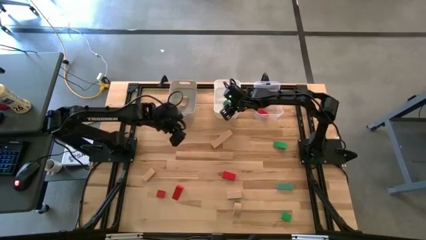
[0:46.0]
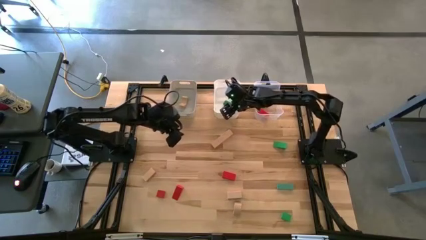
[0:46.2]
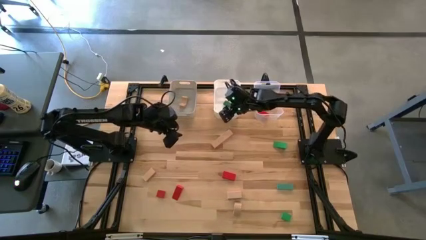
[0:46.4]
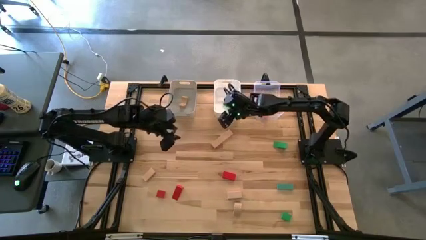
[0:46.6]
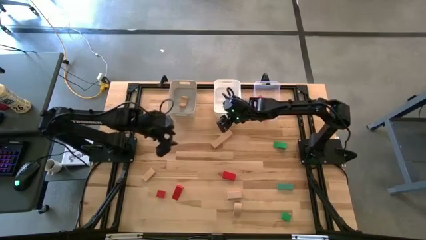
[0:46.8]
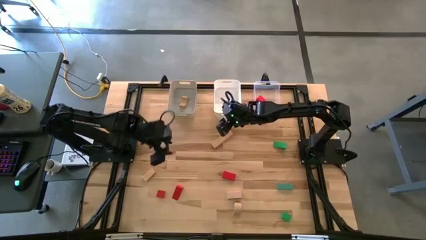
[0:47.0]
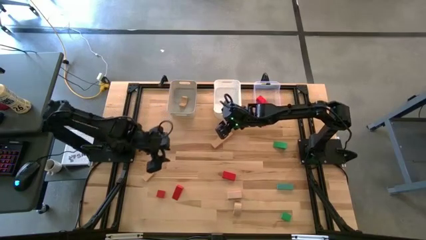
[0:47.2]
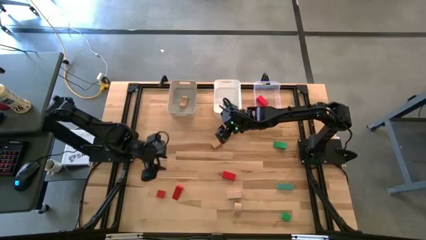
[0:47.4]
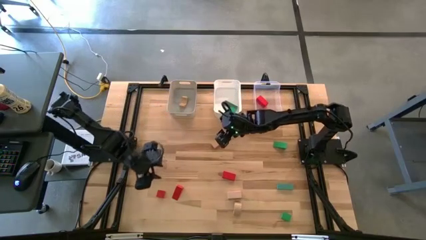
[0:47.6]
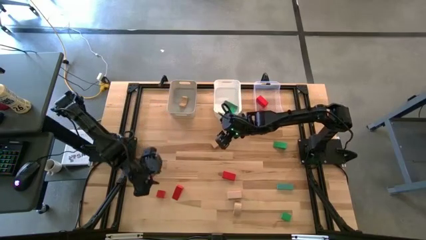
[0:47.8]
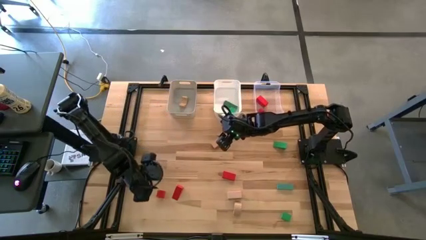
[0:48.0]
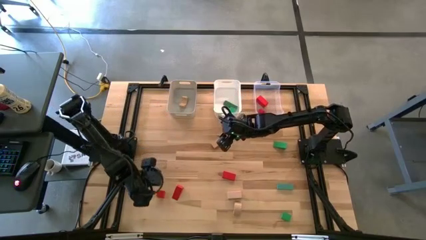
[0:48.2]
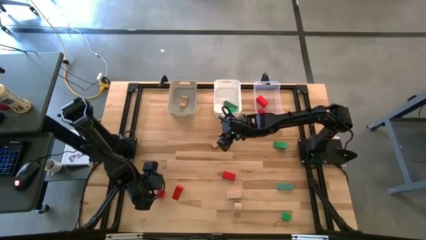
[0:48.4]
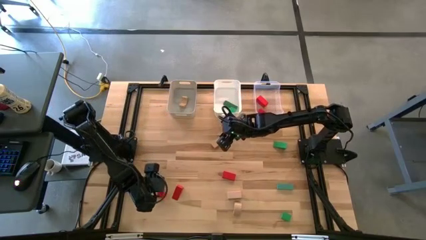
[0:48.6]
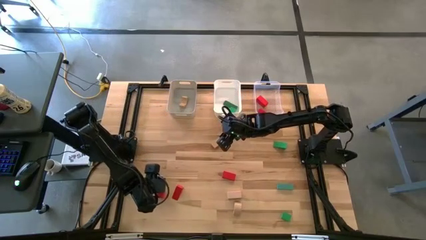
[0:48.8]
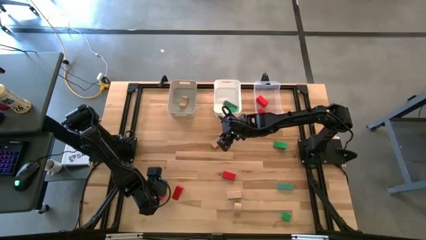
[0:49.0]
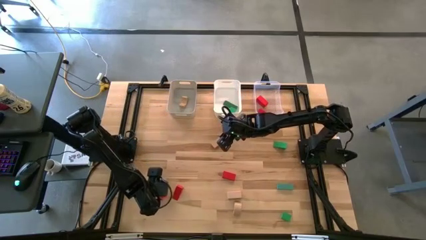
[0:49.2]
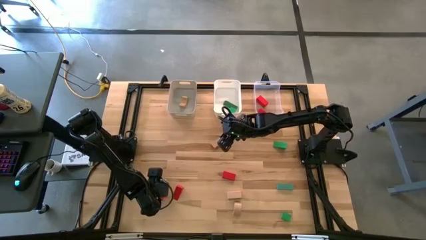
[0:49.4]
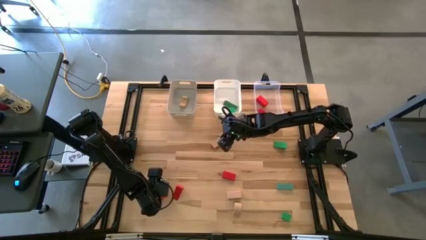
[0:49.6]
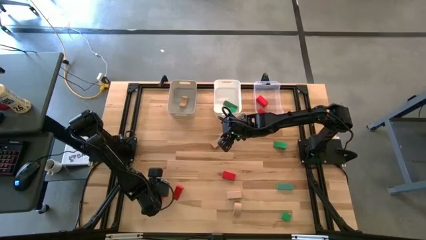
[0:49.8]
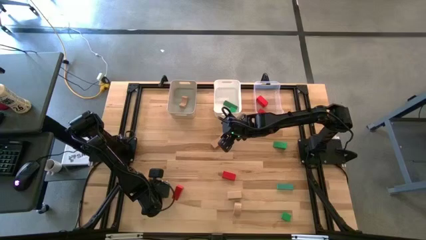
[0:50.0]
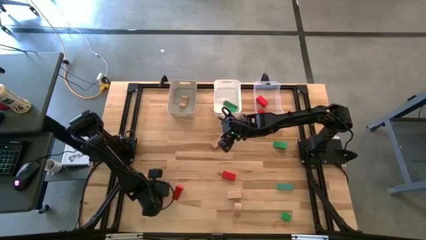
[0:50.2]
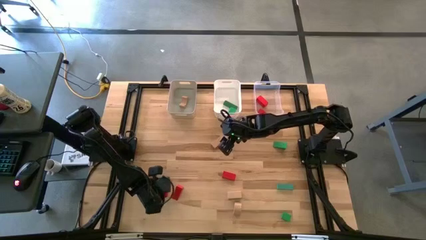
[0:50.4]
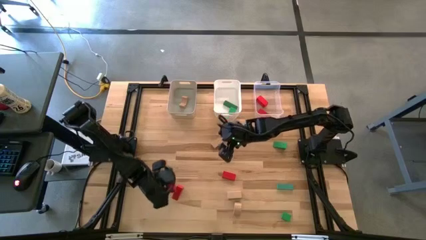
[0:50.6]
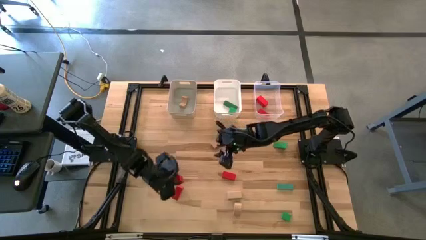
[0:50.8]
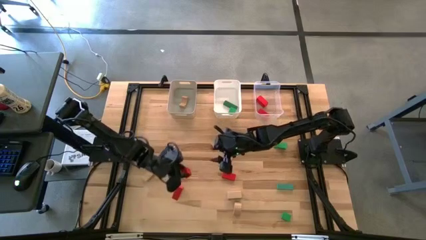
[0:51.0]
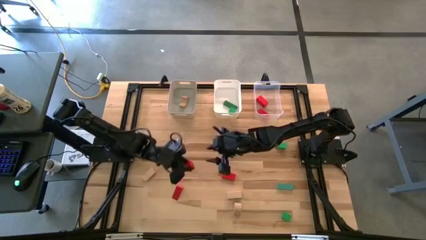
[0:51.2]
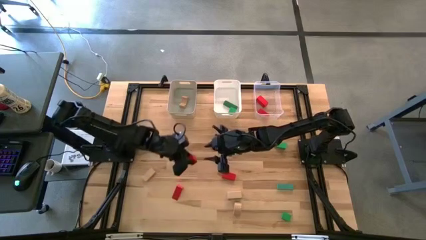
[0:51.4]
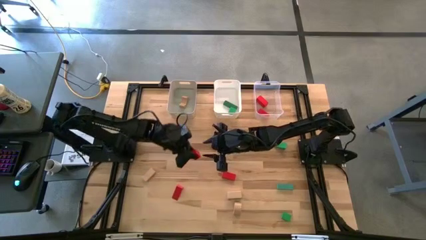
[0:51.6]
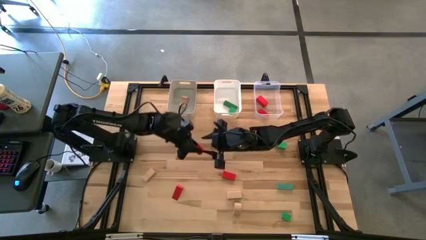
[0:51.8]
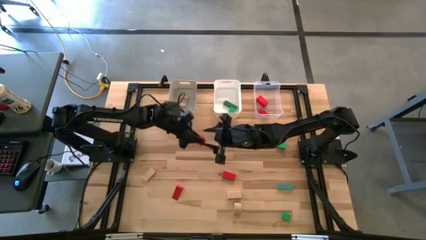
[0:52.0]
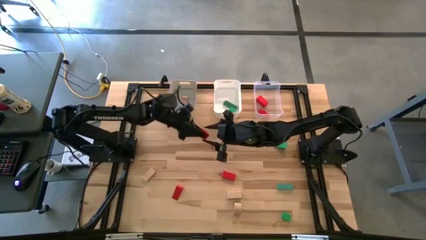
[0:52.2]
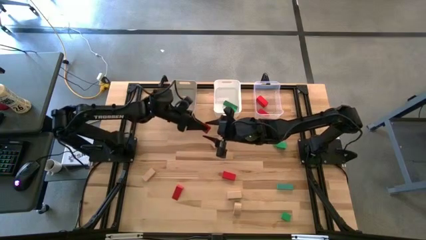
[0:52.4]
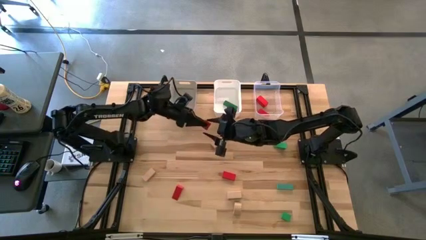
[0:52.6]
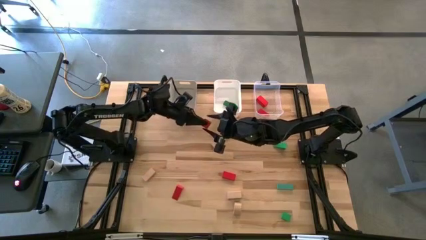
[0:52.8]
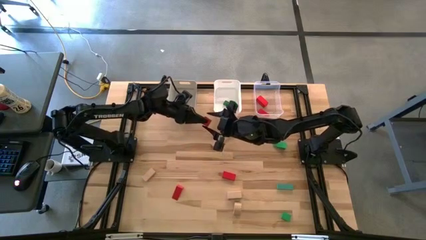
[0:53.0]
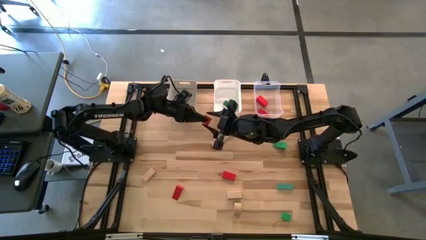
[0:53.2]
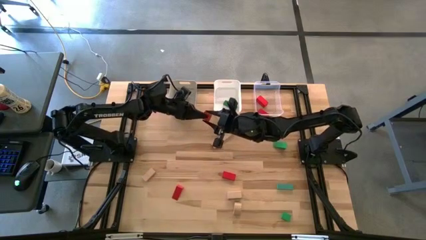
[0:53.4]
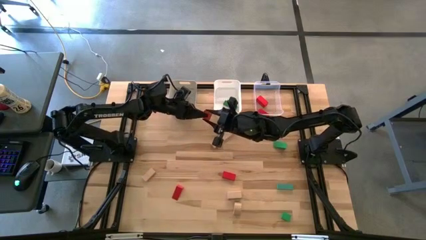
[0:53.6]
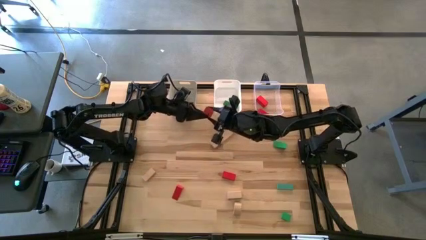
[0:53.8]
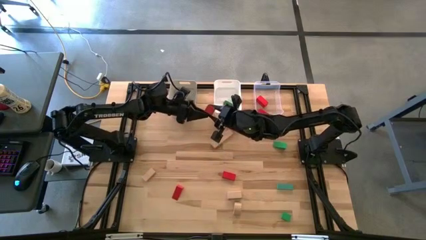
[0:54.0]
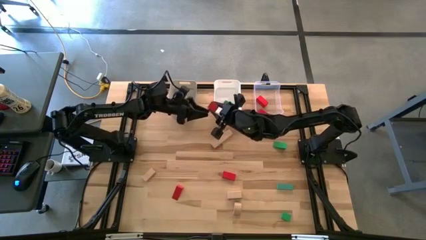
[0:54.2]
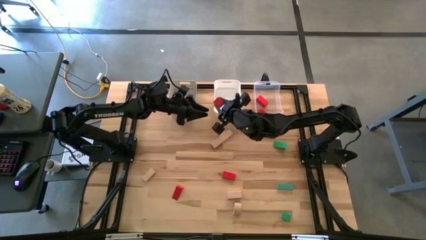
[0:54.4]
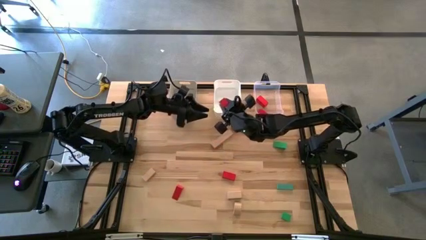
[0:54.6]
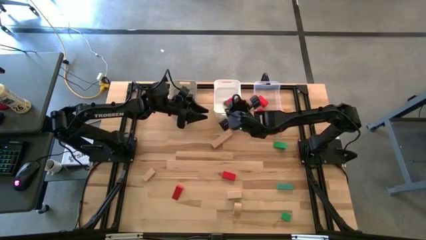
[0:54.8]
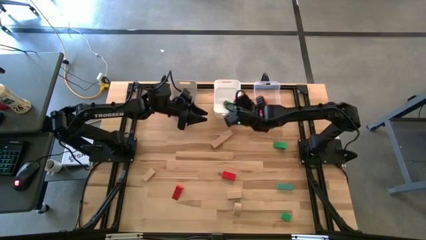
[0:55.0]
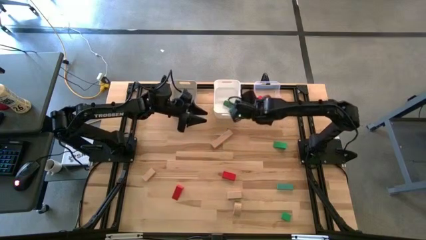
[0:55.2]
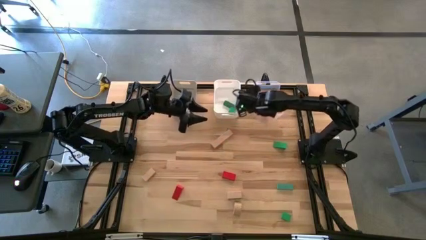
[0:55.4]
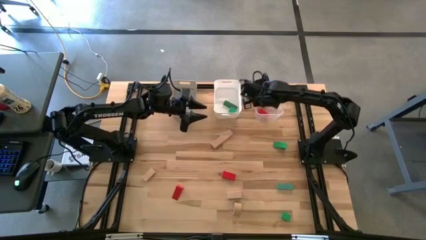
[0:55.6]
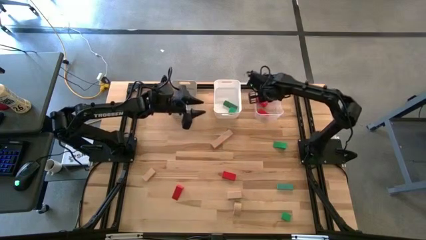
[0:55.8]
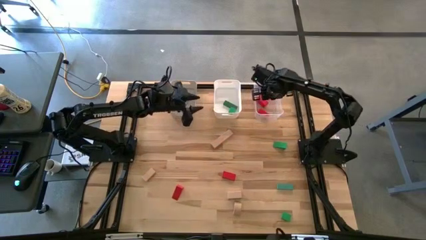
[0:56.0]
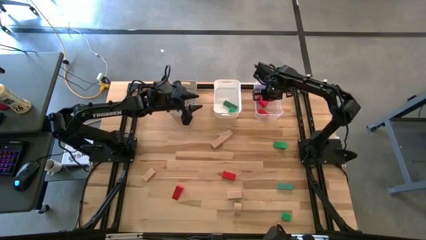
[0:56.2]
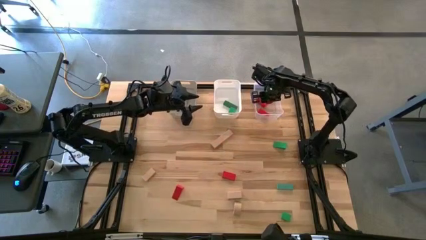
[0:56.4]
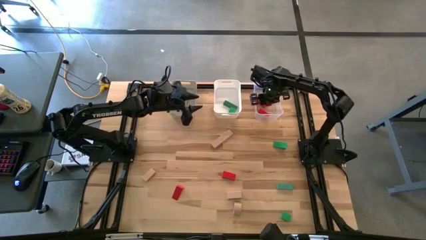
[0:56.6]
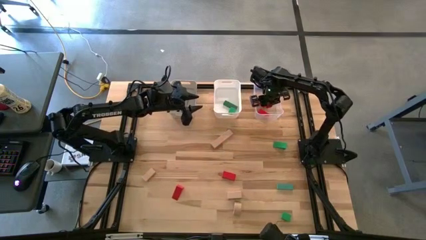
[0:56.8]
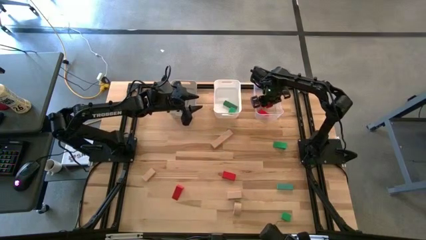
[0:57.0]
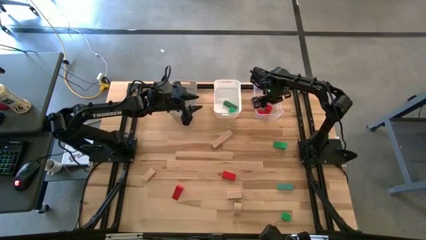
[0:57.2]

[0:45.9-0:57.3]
Task: Sort & place blocks by color
Put the red block into the transparent bin

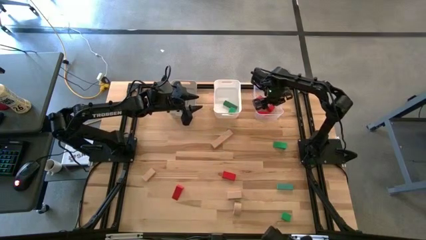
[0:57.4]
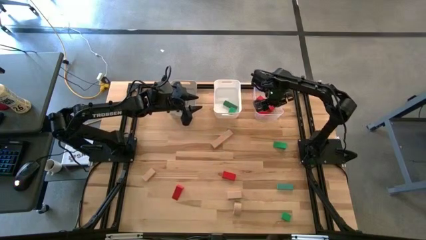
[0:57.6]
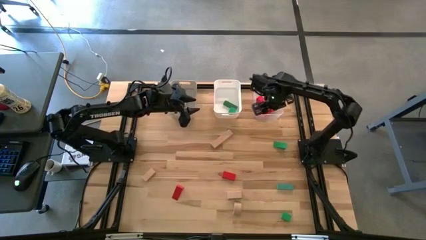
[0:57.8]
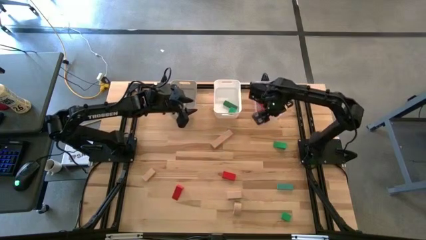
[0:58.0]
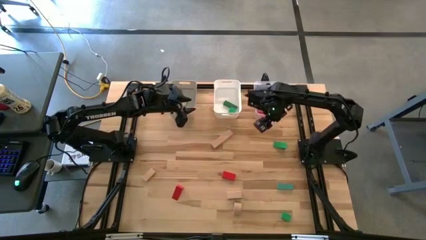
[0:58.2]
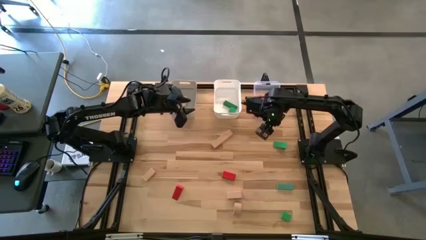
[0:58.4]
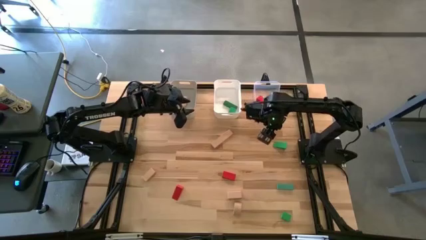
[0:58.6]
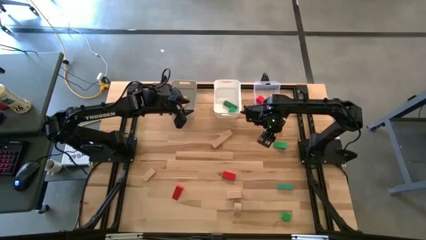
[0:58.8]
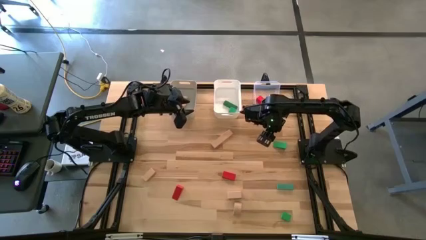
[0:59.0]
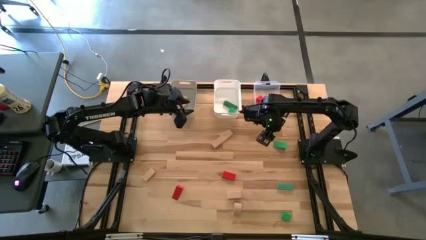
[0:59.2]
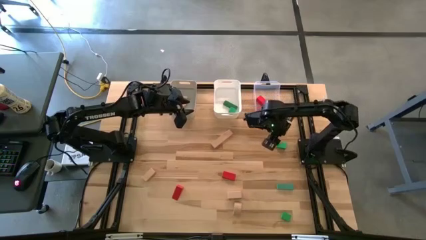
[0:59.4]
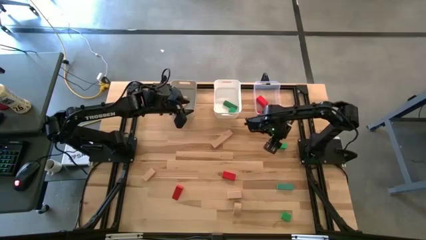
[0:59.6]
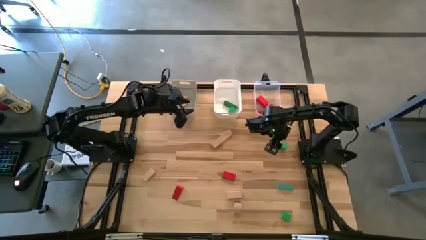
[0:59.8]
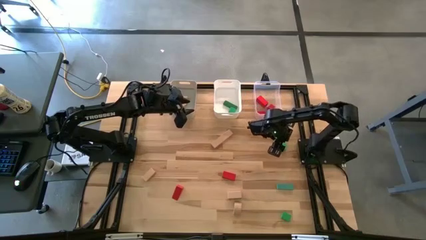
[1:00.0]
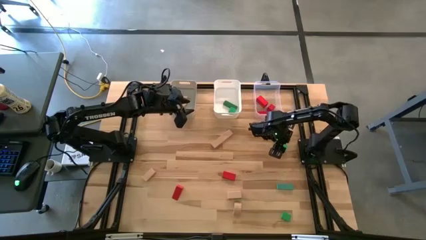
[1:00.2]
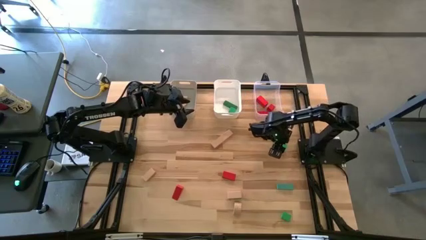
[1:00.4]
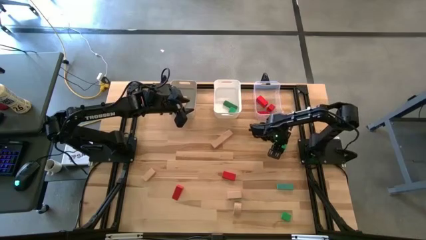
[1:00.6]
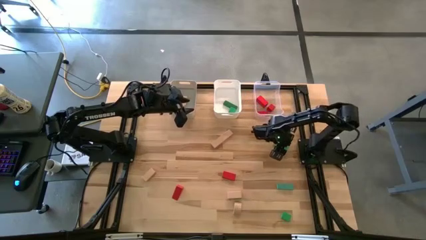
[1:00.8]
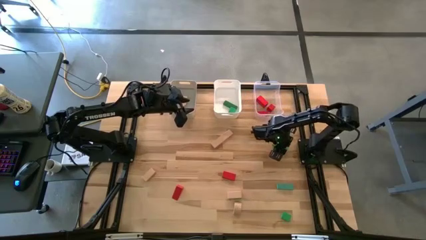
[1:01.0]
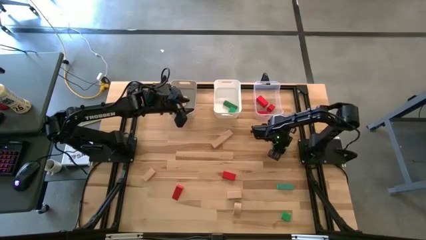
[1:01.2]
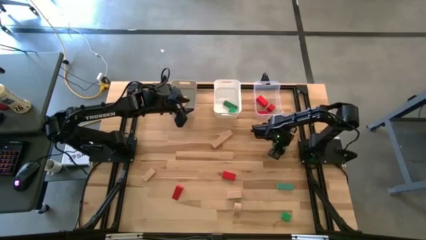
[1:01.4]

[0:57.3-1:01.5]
Put the green triangular block into the white bin

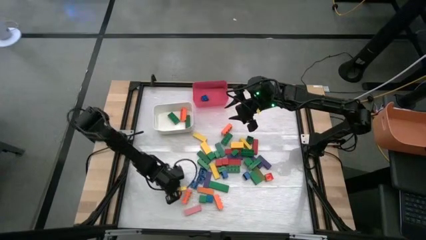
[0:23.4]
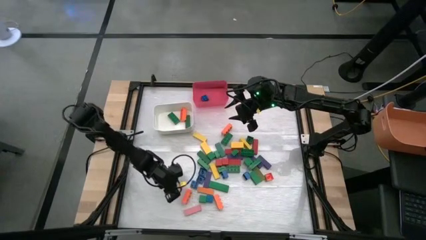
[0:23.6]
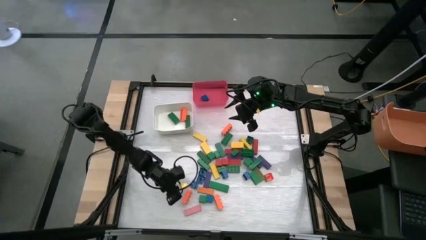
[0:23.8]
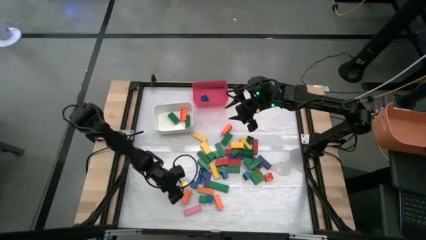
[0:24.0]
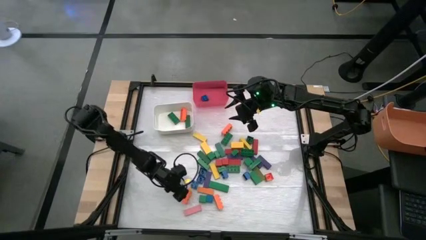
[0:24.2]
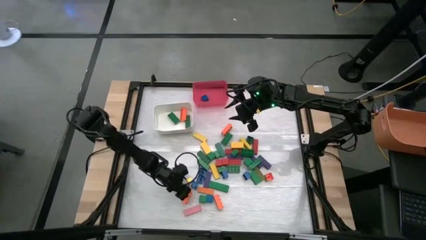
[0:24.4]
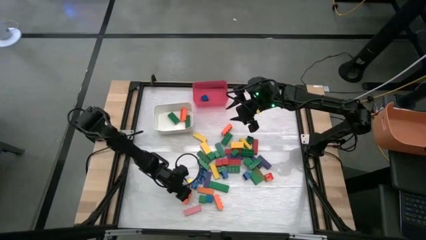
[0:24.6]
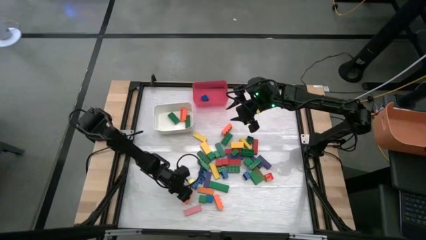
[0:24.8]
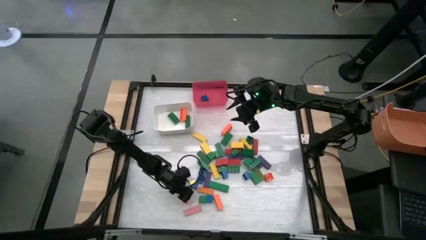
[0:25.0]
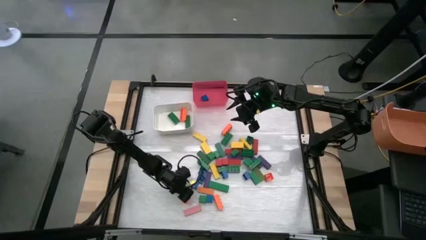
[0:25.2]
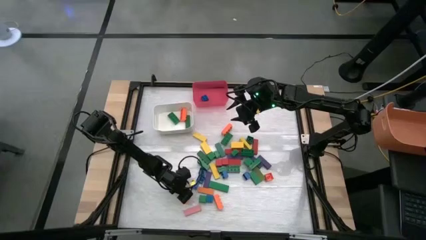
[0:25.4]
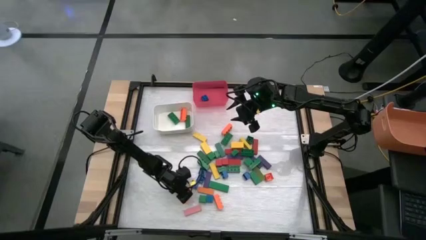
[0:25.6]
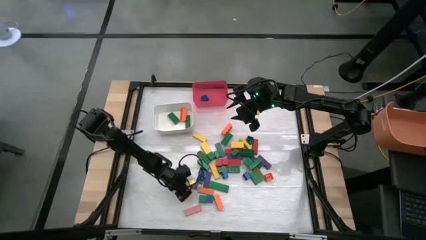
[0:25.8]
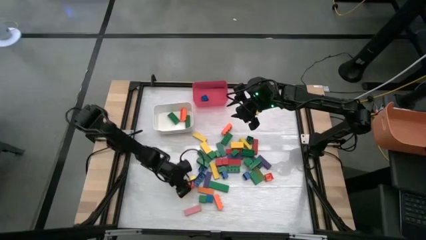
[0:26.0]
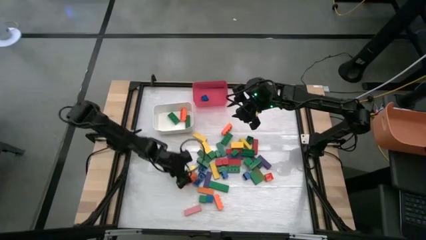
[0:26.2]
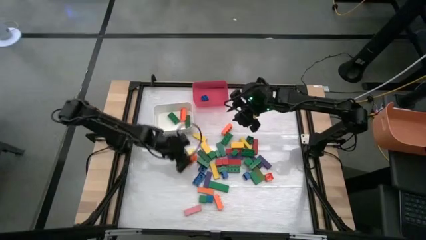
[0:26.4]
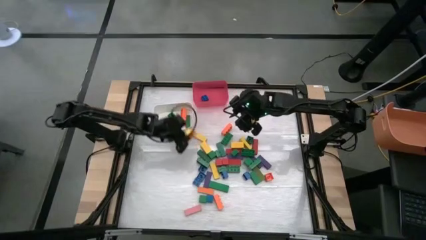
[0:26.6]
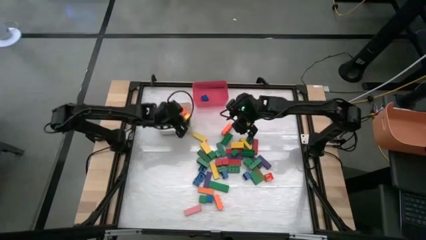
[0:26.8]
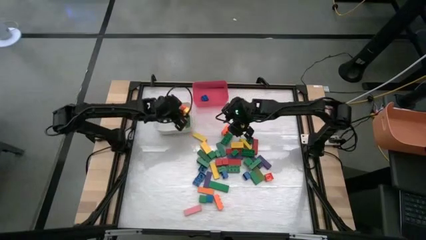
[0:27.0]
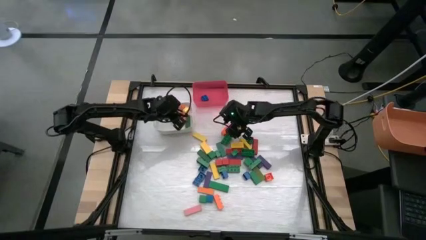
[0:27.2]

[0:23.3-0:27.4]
Task: Sort blocks by size
Put the large orange game piece into the white bin
